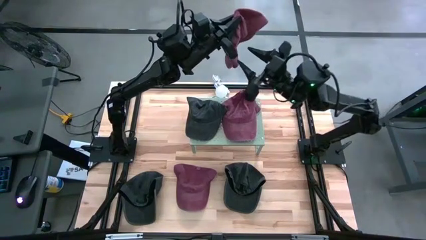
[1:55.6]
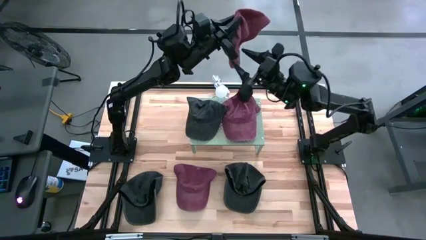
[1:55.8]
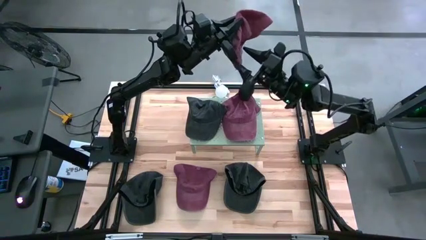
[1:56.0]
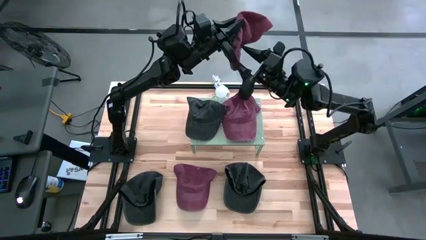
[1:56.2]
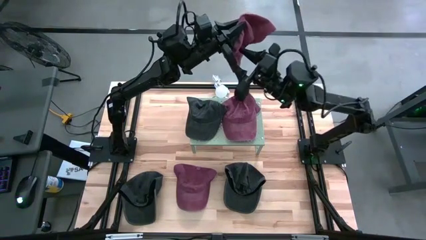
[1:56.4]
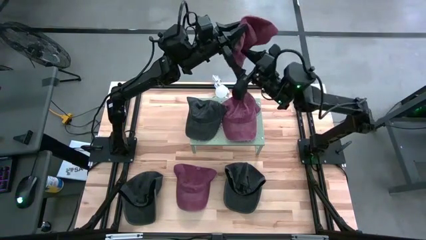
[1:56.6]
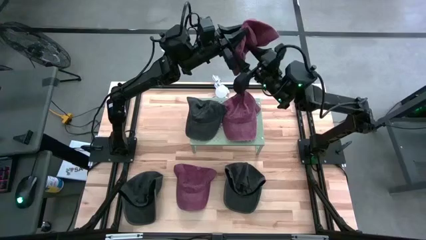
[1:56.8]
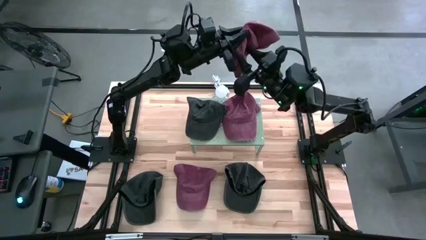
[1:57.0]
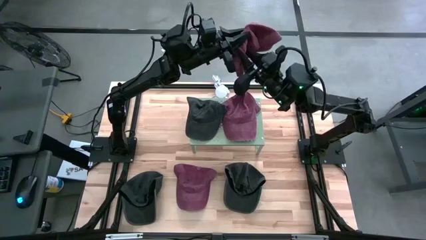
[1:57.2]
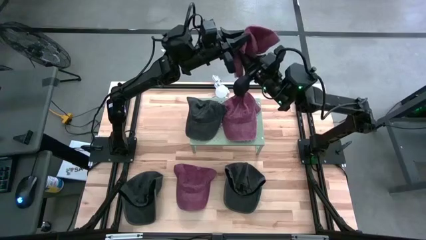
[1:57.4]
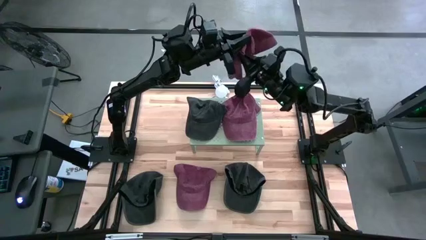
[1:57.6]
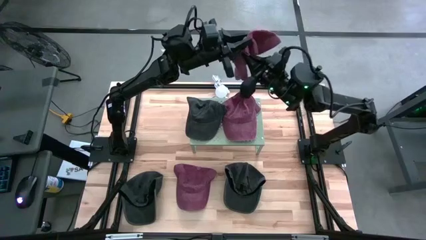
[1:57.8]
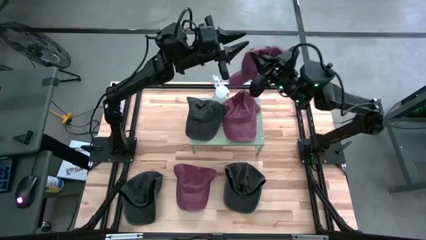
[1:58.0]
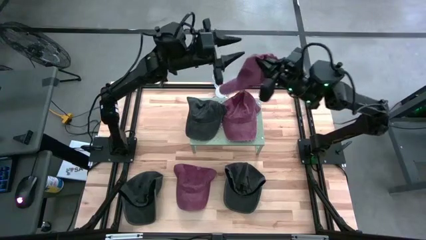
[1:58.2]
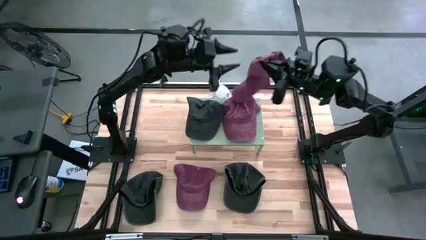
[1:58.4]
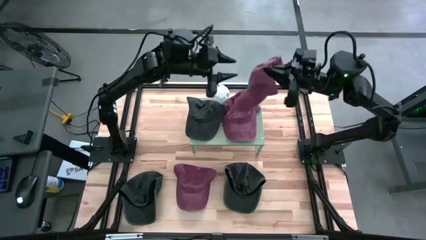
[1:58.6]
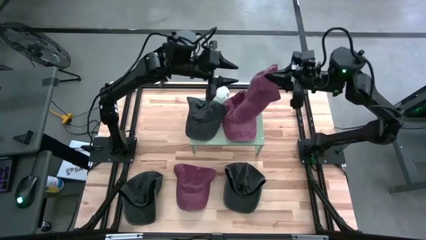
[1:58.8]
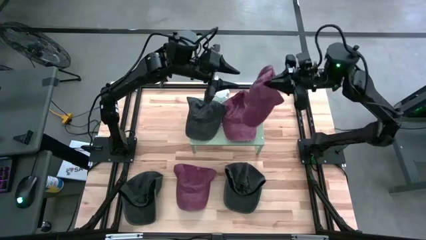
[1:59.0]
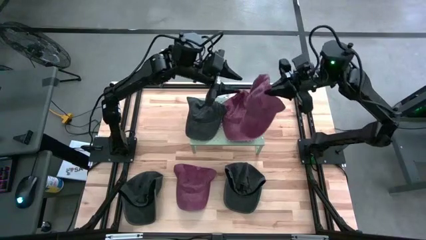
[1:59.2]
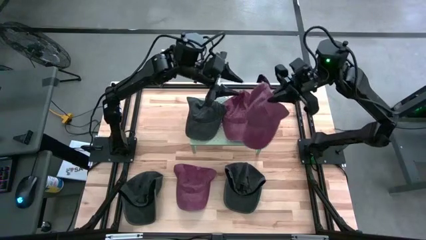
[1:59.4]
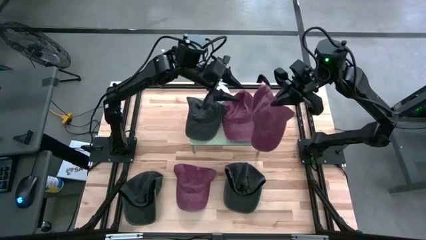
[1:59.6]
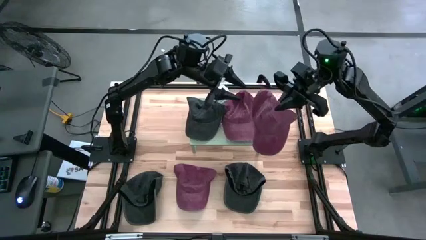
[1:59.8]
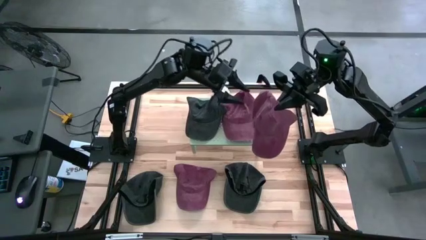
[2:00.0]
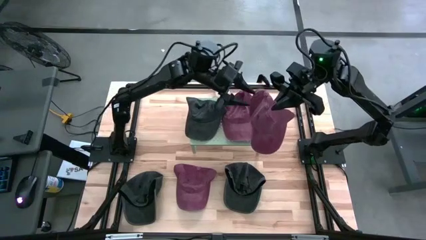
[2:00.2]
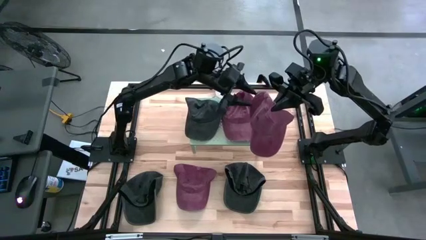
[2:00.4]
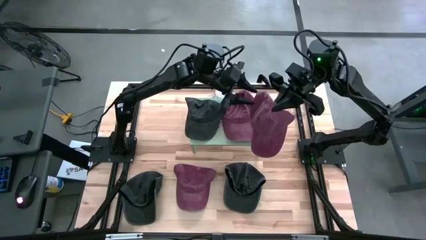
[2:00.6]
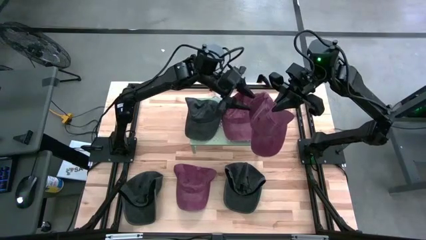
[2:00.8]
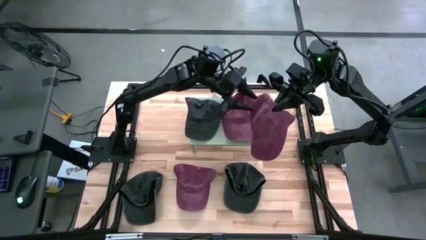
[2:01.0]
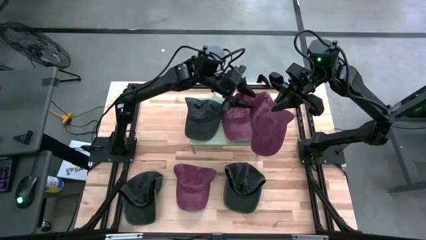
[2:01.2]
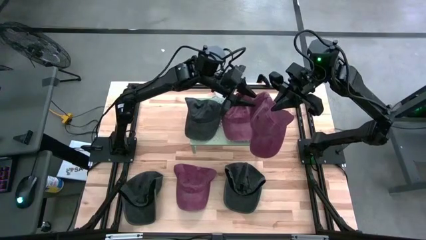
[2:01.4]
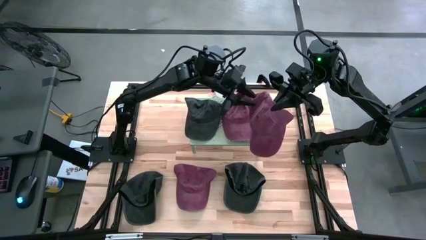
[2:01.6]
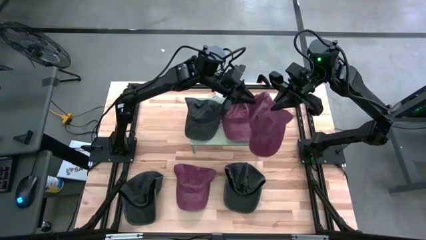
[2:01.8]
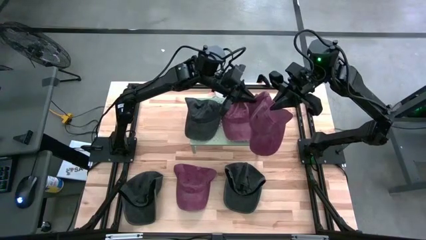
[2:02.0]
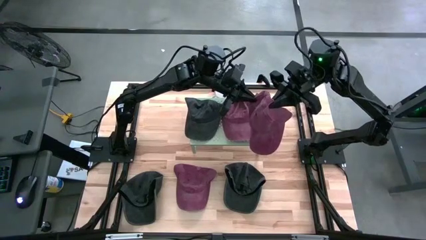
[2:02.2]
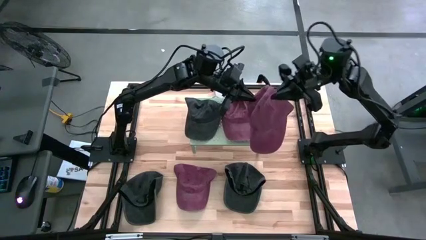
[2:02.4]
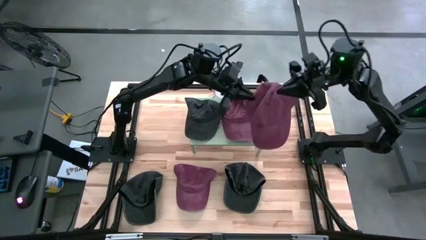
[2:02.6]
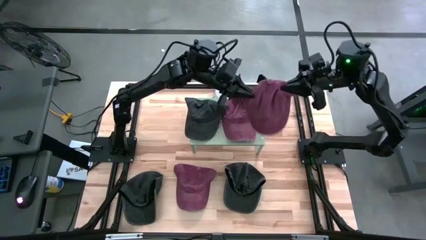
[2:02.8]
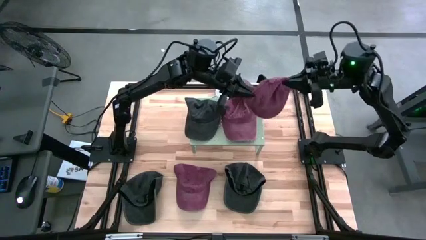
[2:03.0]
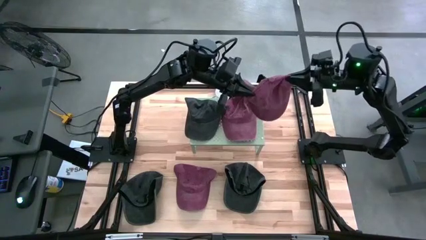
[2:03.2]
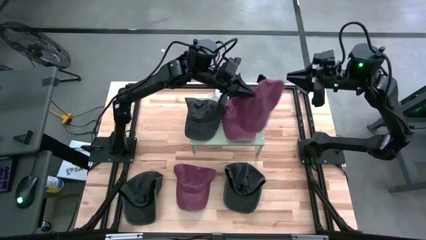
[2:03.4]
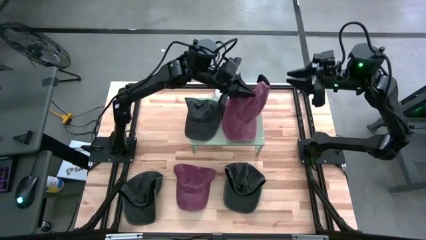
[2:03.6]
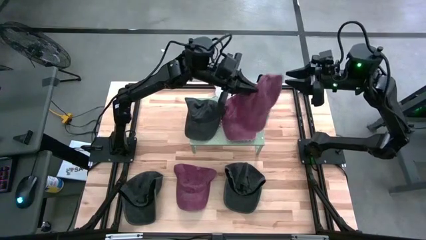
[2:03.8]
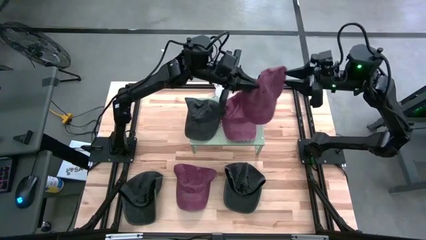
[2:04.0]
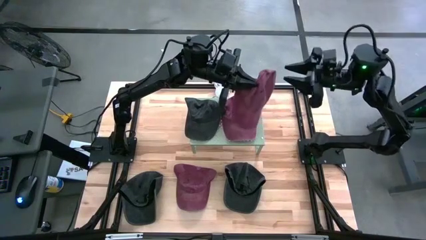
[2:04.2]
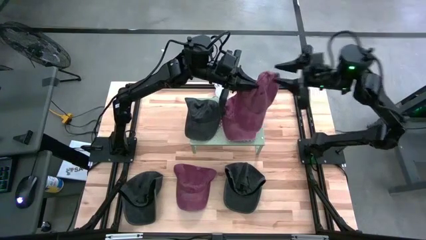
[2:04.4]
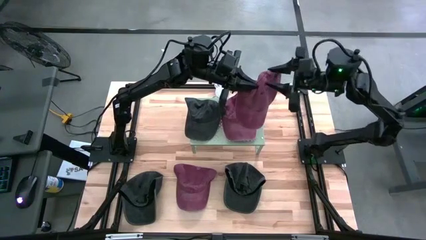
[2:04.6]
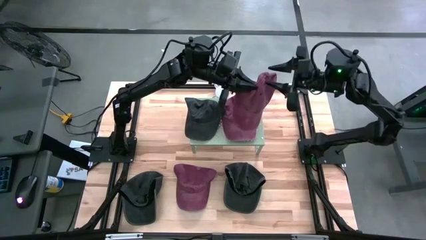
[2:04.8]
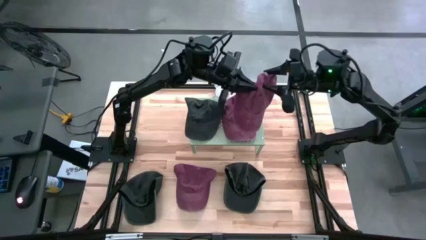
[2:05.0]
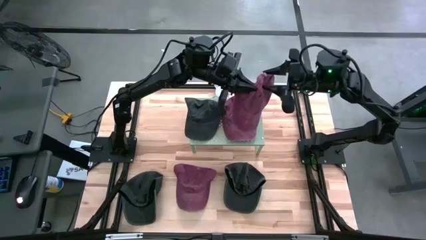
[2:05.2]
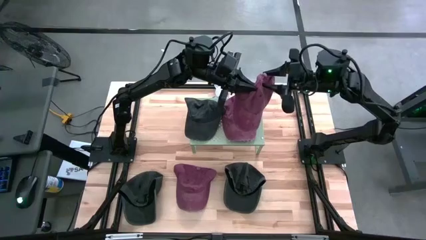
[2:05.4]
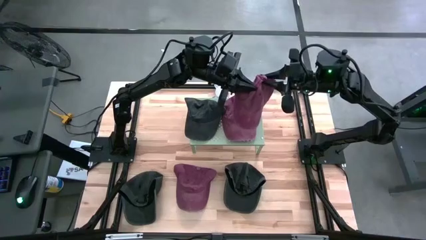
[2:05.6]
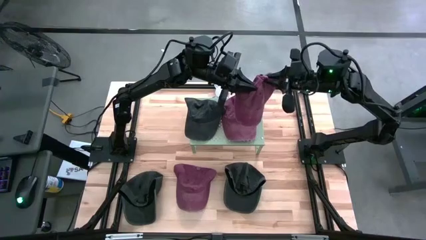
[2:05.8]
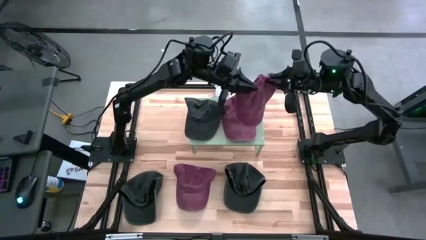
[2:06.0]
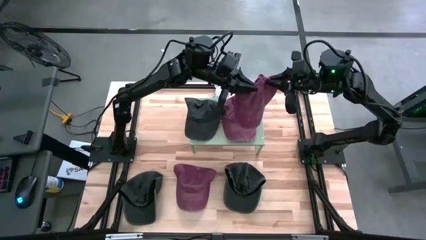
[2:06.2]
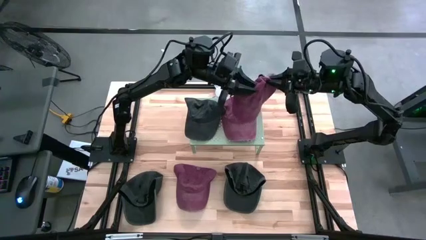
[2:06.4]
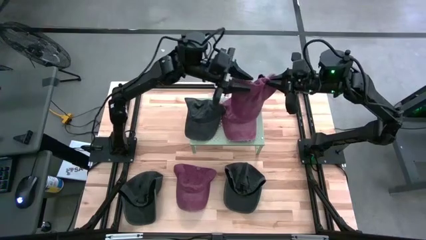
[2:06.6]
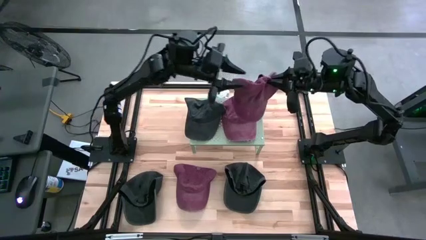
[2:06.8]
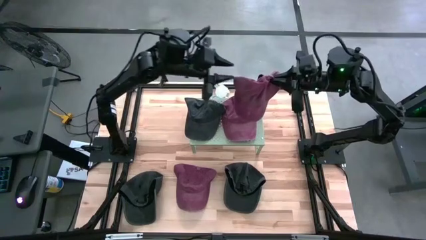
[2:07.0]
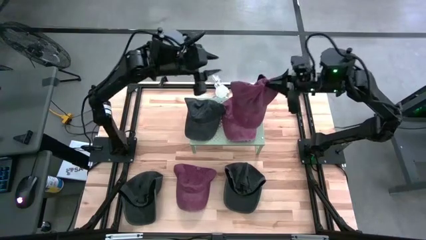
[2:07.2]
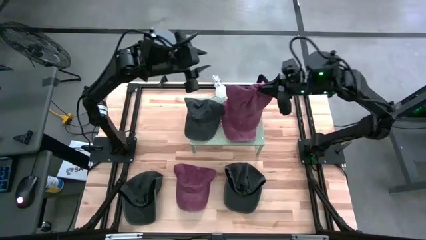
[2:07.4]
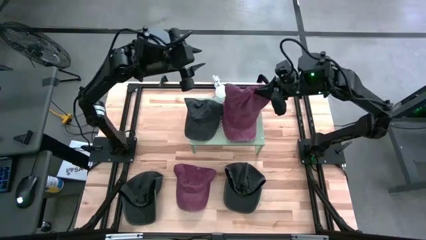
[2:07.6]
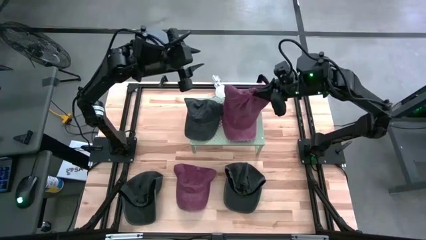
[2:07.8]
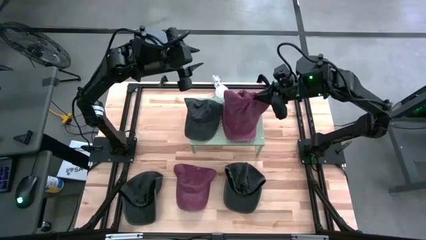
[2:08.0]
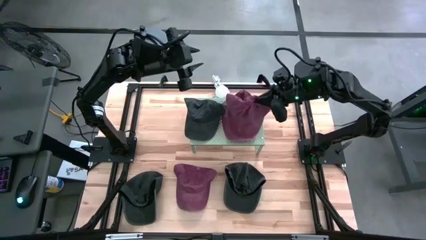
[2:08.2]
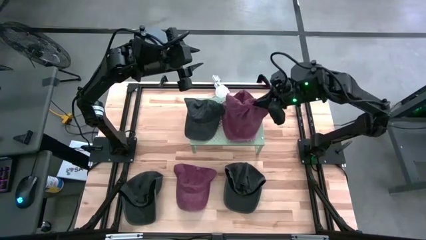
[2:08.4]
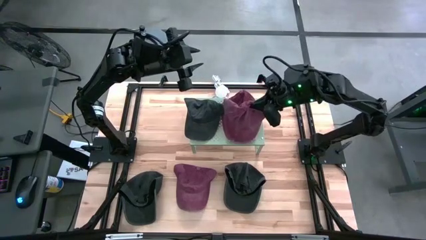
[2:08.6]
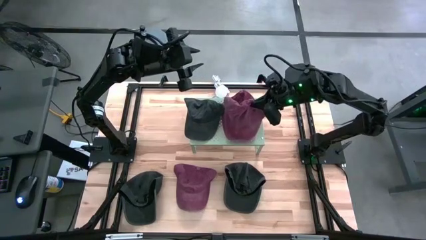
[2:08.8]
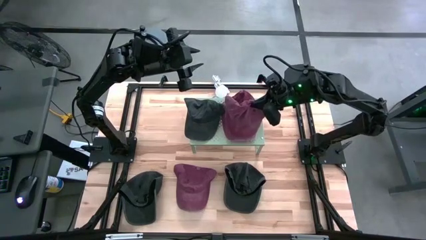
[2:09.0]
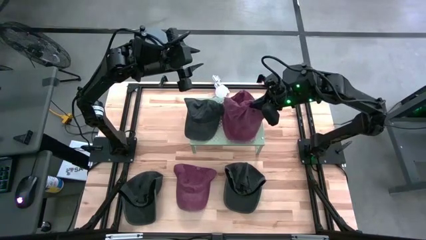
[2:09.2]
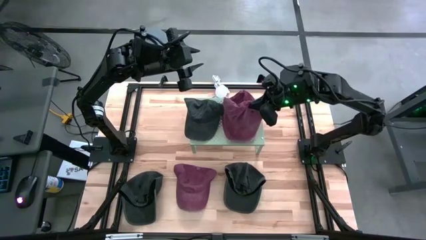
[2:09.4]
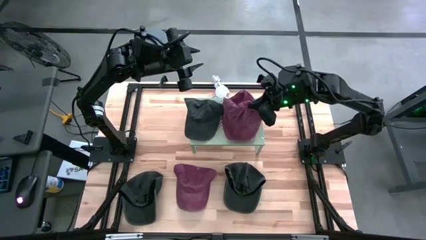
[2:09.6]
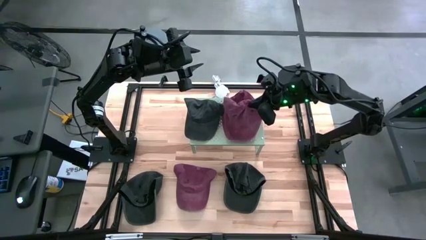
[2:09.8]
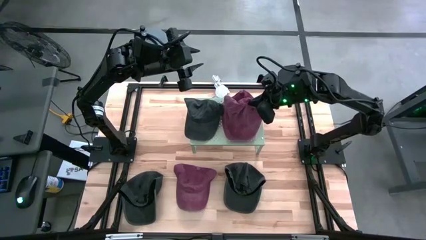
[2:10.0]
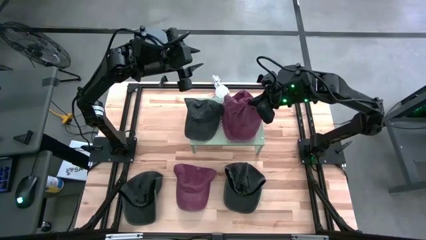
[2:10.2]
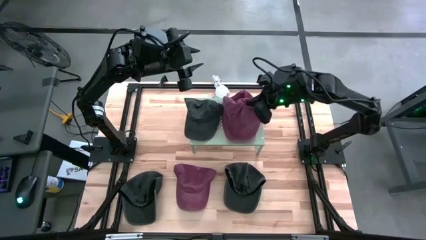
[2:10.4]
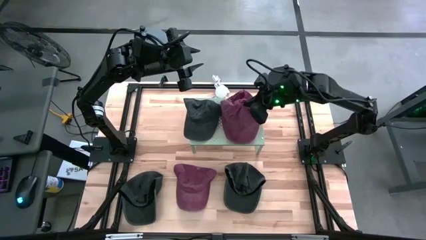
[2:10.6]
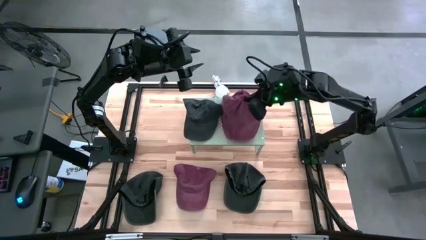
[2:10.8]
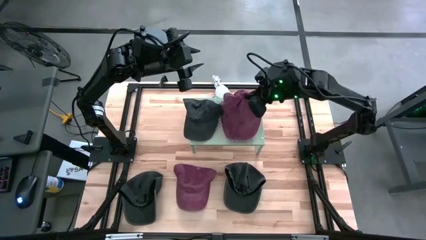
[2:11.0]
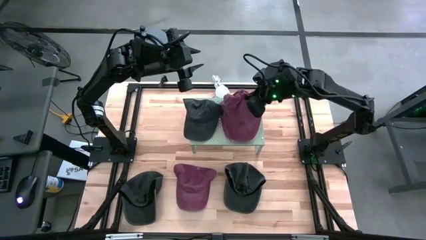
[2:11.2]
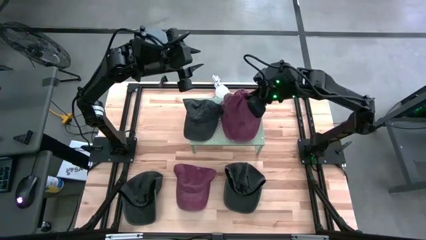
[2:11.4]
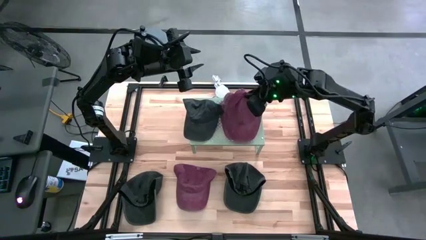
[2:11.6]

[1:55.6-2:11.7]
Task: Pick & Place hat
Stack the top red cap on top of the red cap on the shelf

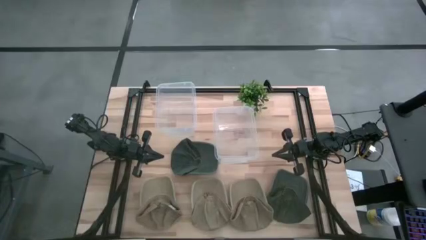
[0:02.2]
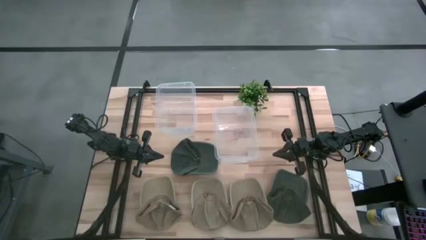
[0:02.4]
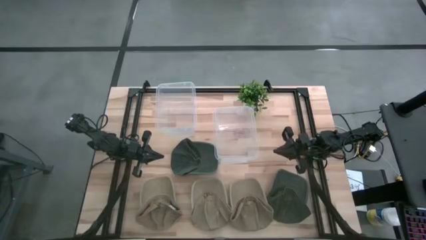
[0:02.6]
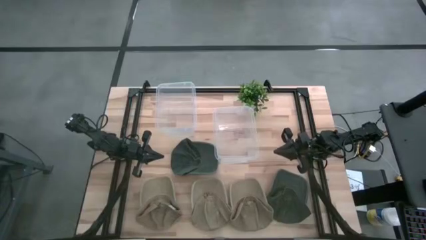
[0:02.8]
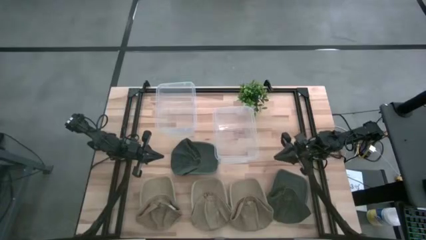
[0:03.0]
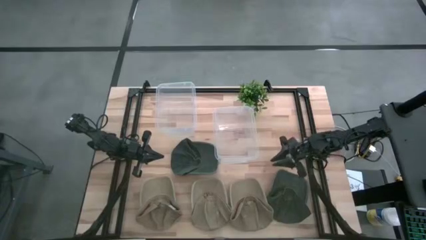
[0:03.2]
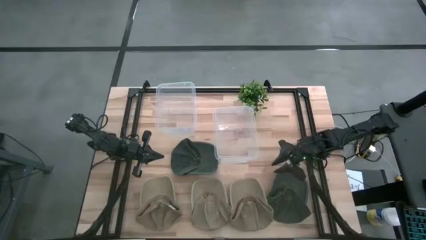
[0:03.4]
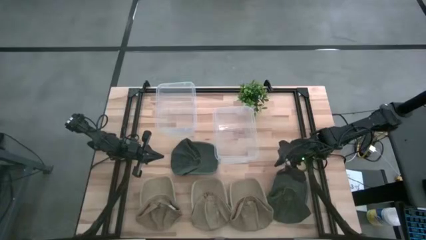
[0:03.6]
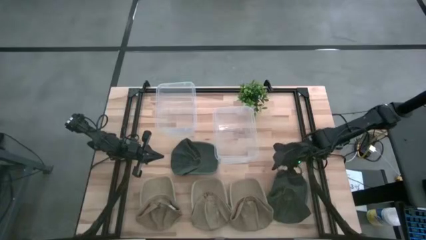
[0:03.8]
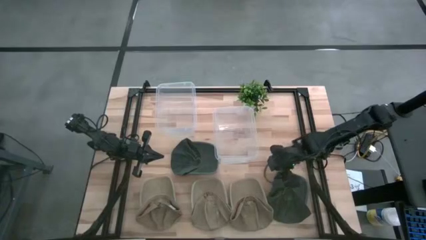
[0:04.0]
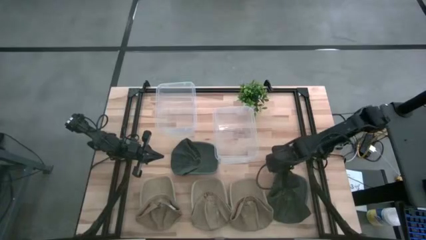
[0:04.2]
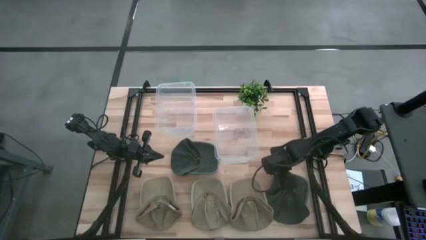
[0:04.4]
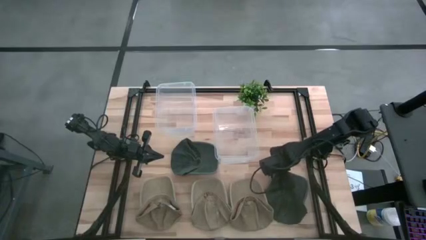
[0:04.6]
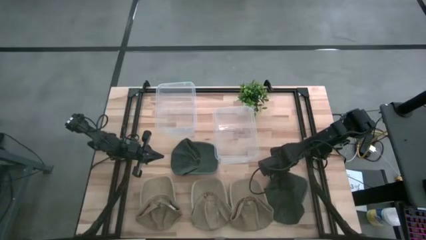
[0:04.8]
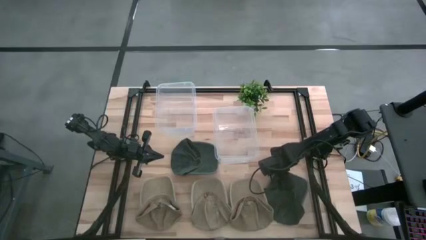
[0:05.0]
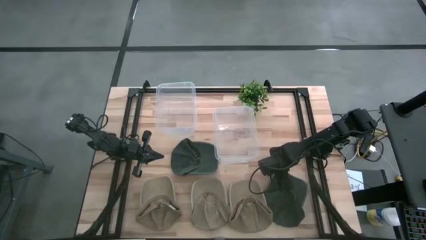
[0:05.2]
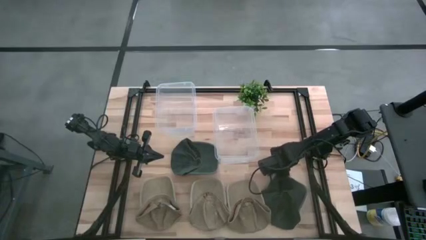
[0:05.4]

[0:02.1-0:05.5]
Task: Pick & Place hat
Put the bottom dark gray cap into the right transparent bin
